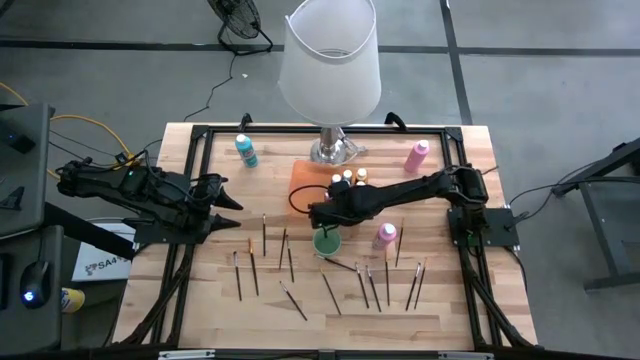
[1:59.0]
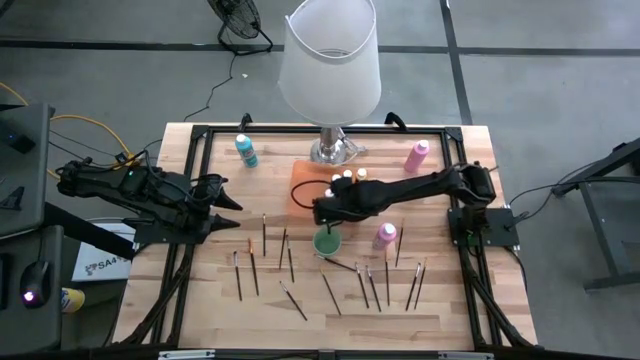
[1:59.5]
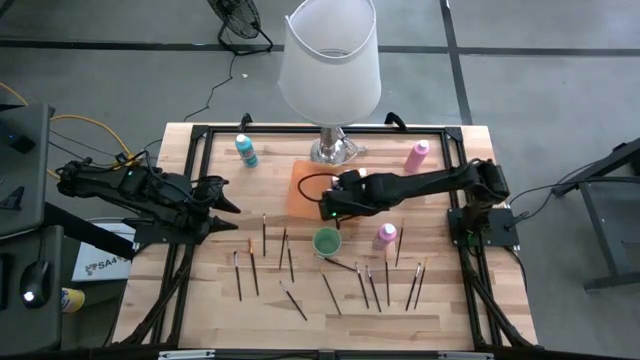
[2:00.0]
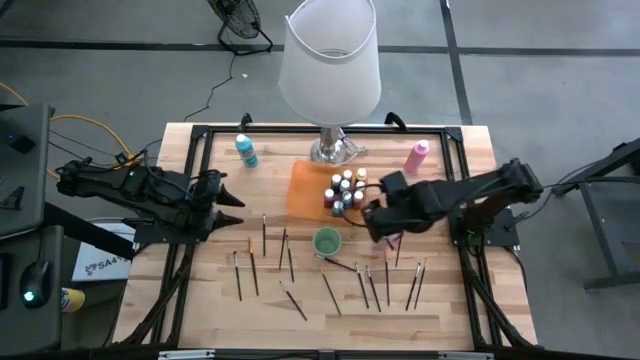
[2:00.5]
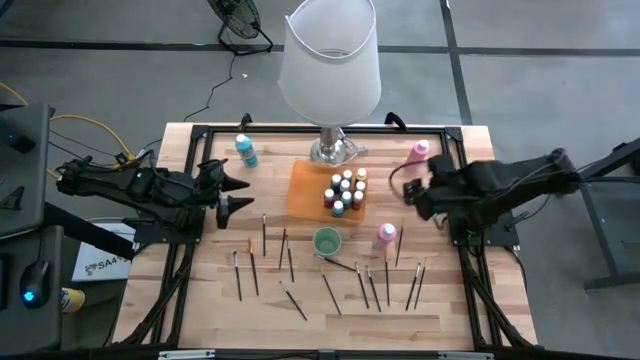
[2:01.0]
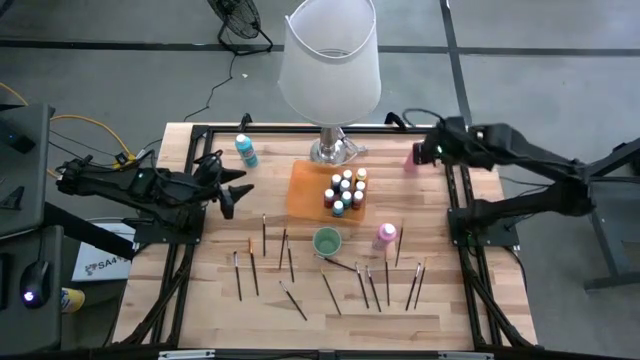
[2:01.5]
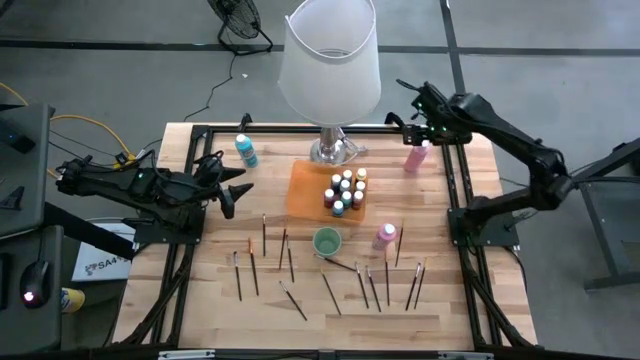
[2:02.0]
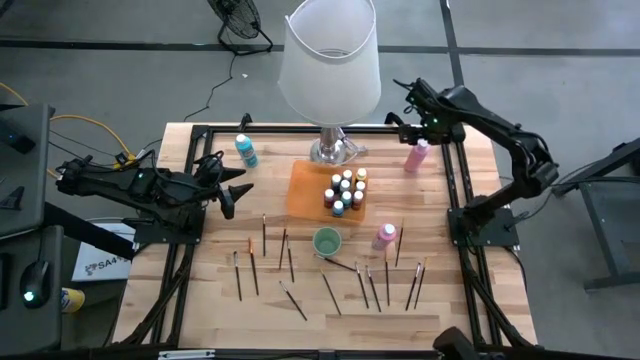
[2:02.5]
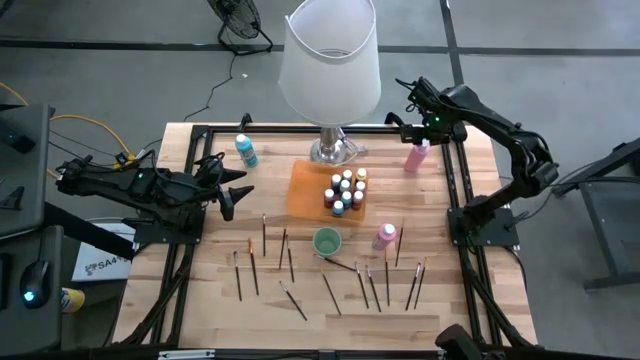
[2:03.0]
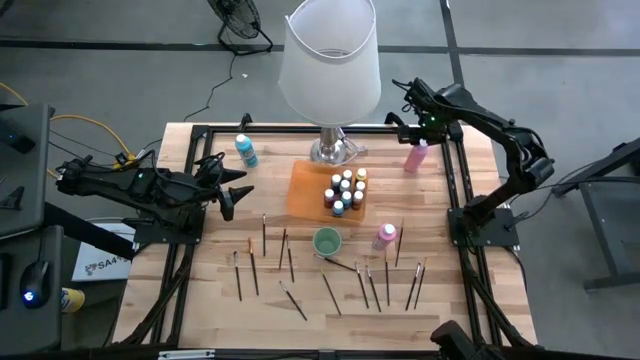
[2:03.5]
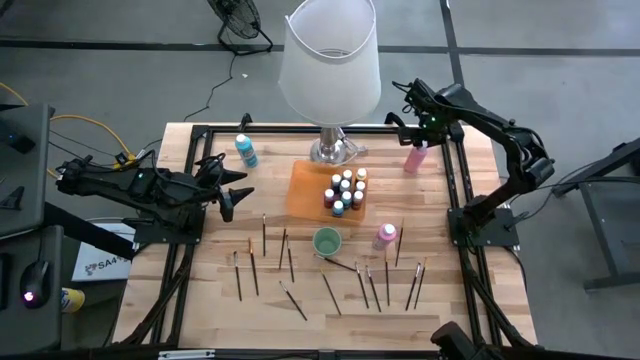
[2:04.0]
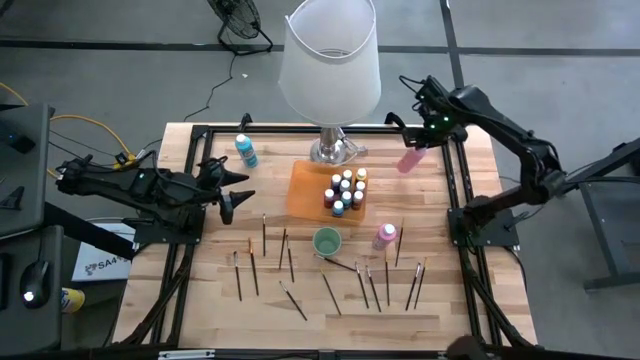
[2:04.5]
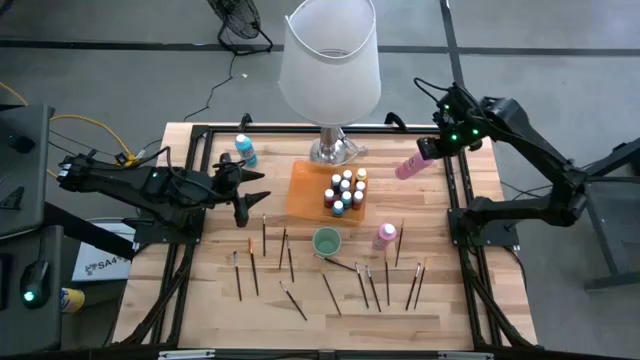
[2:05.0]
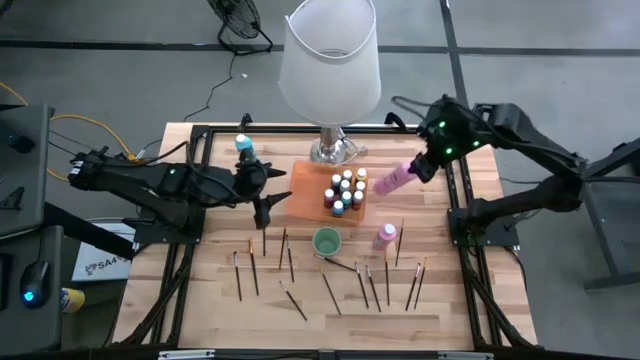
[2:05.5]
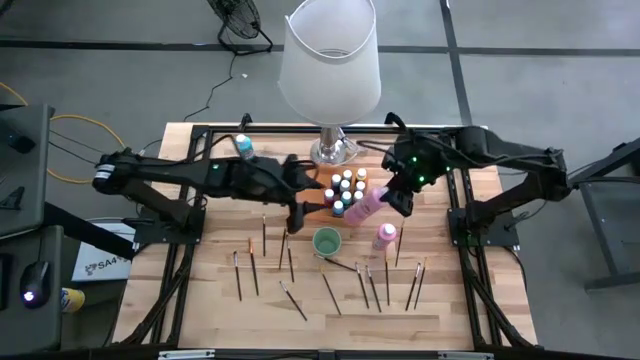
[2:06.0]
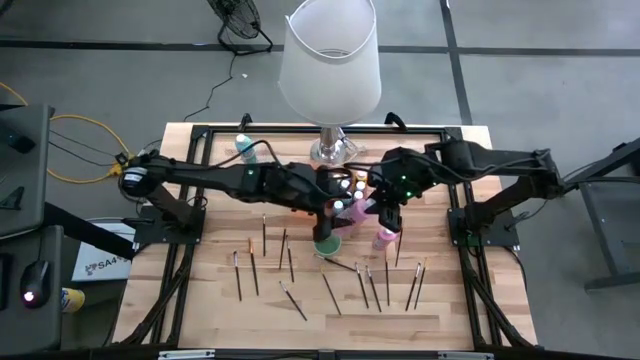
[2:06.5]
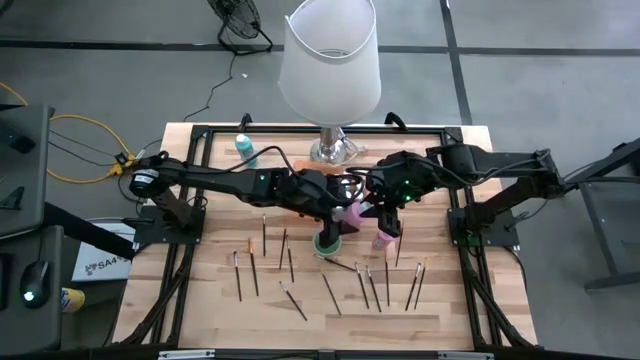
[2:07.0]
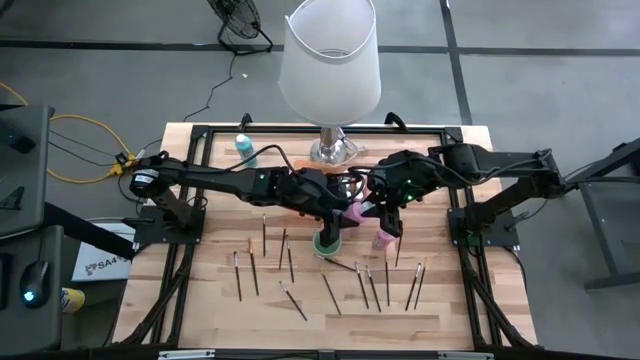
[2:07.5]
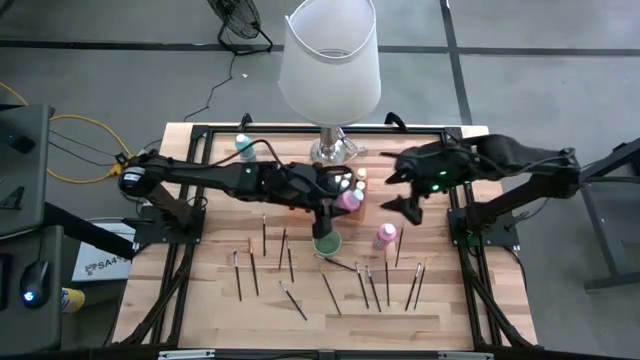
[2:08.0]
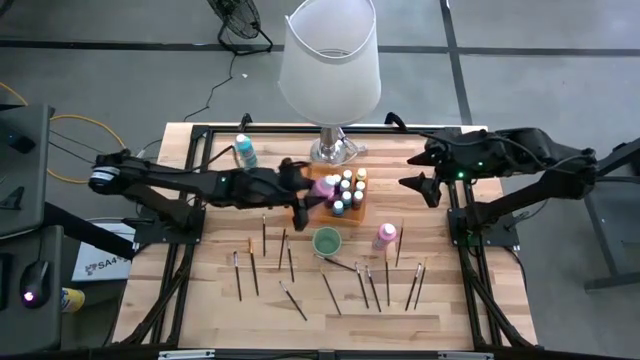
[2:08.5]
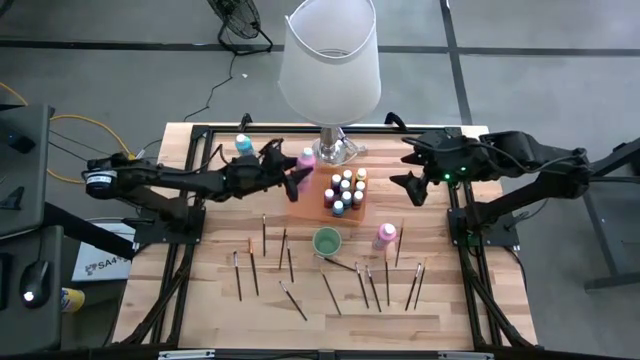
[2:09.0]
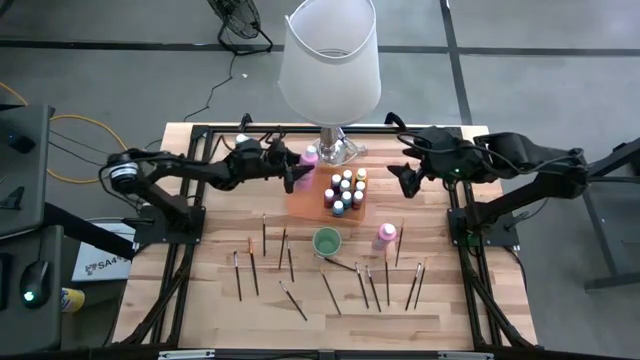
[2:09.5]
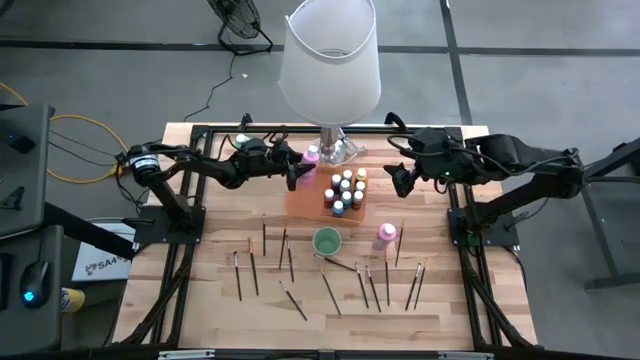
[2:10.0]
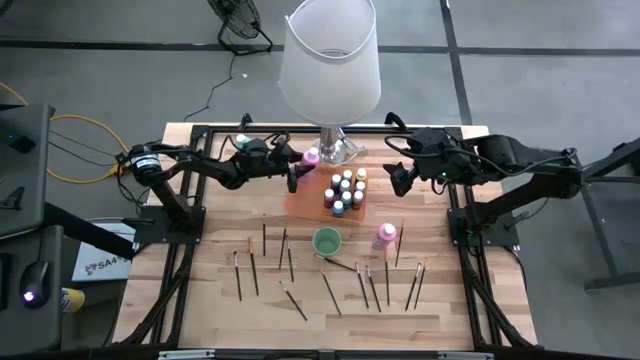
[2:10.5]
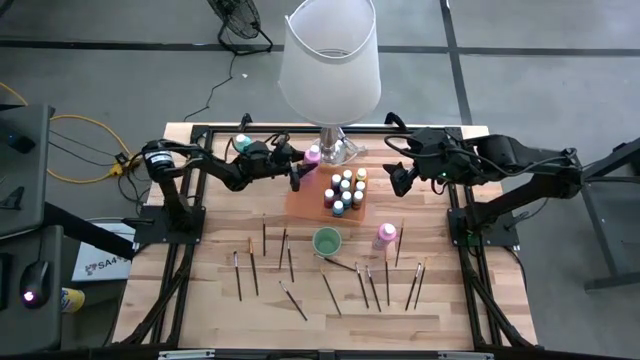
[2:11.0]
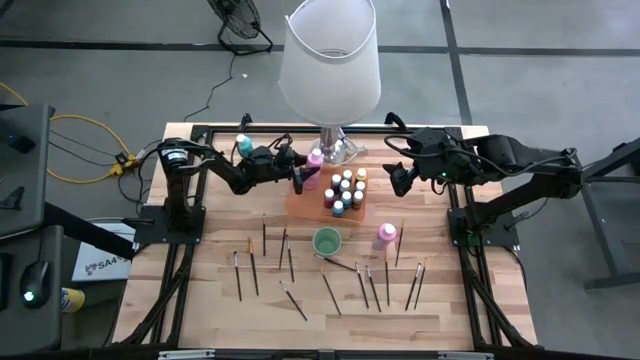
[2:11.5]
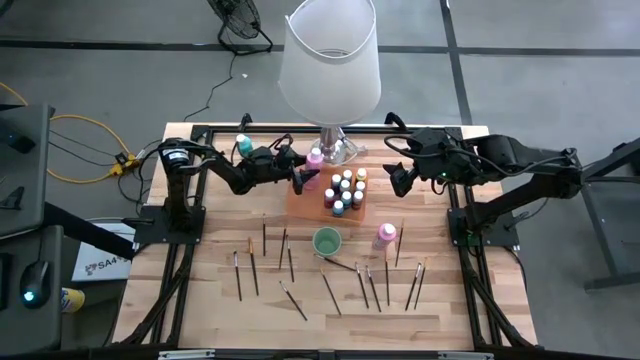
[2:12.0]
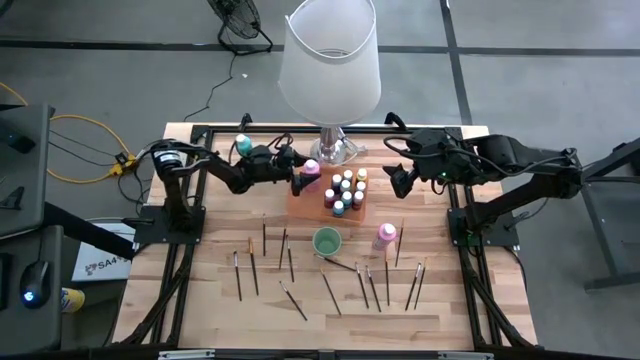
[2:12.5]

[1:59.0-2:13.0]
Task: Pick & Place Paint Supplies
Put the big pink paint bottle into the orange bin

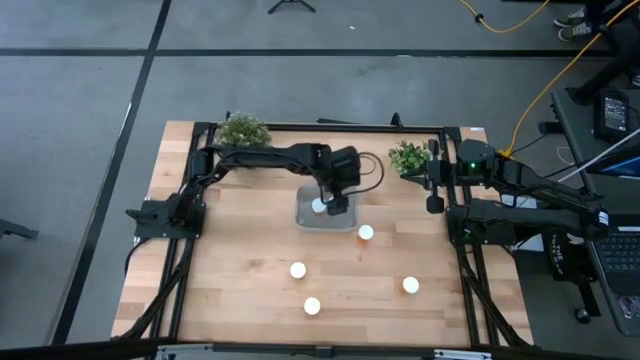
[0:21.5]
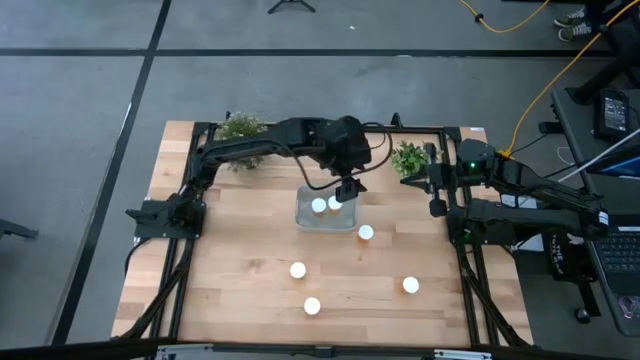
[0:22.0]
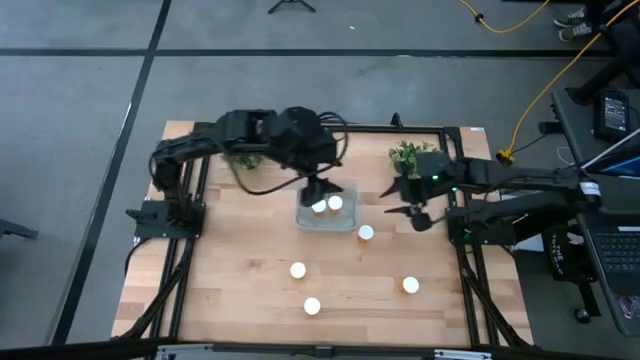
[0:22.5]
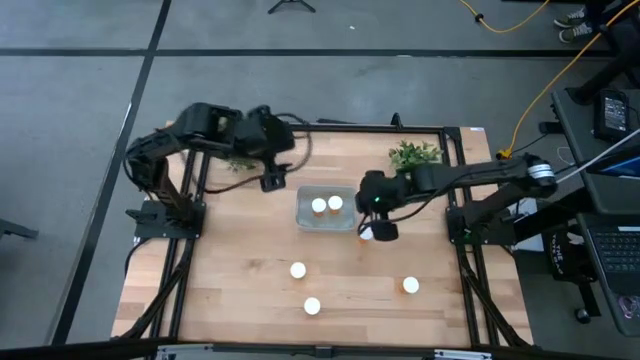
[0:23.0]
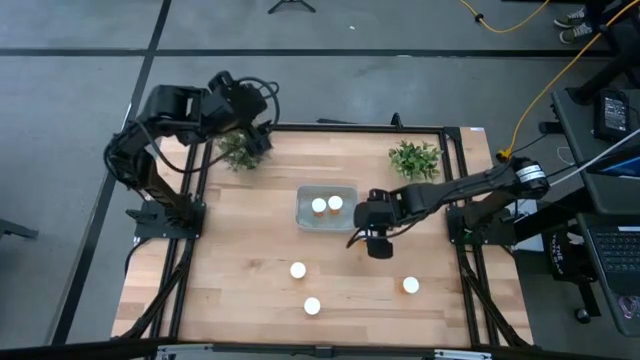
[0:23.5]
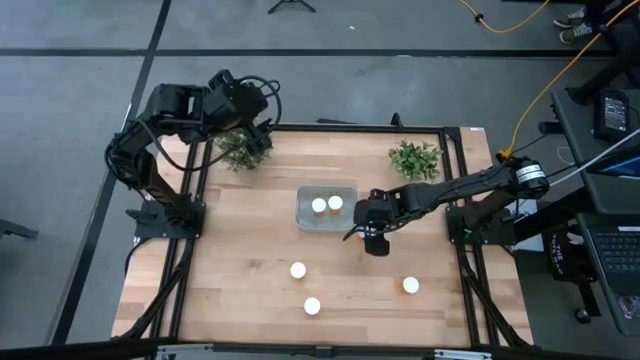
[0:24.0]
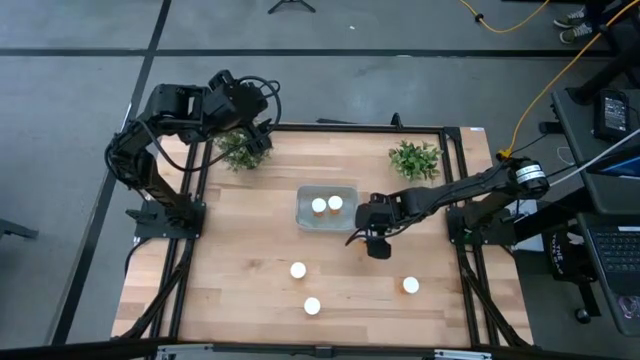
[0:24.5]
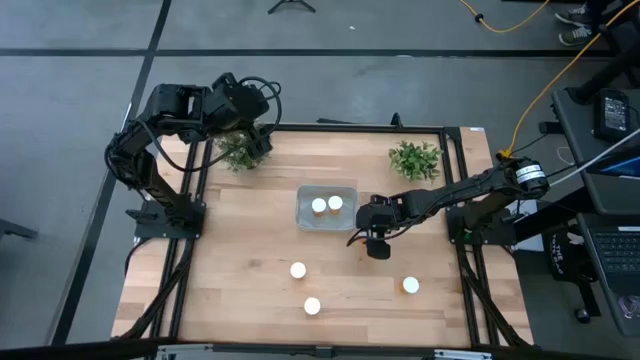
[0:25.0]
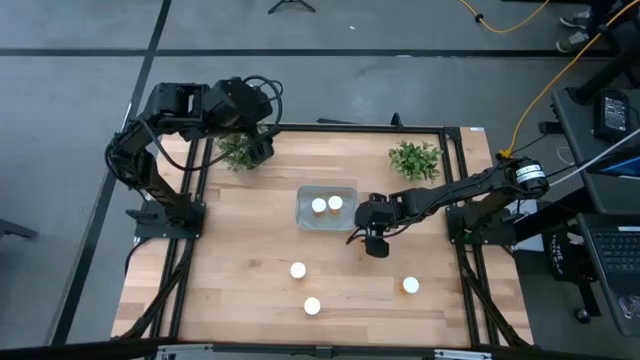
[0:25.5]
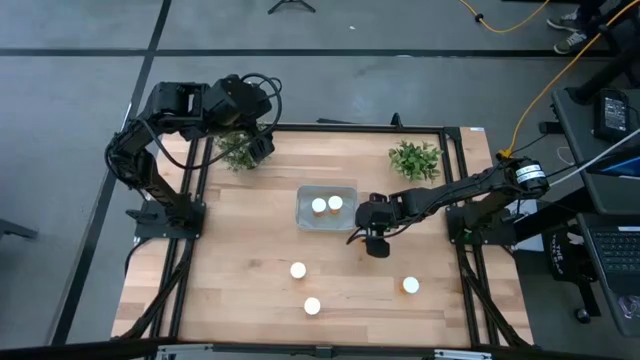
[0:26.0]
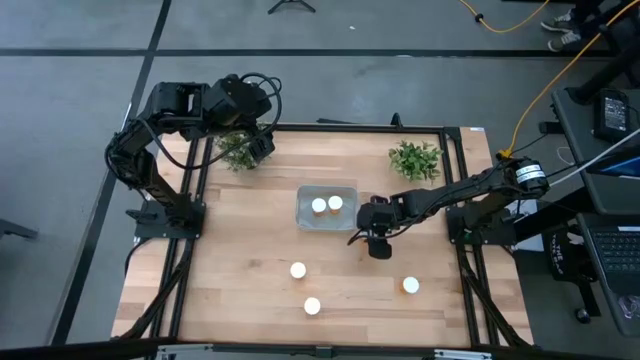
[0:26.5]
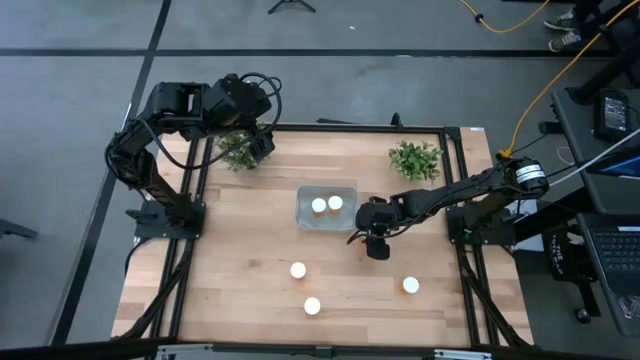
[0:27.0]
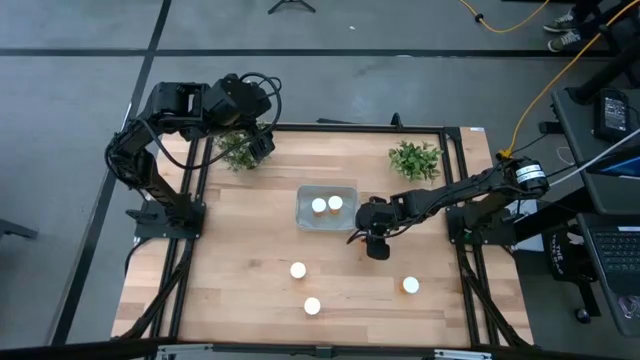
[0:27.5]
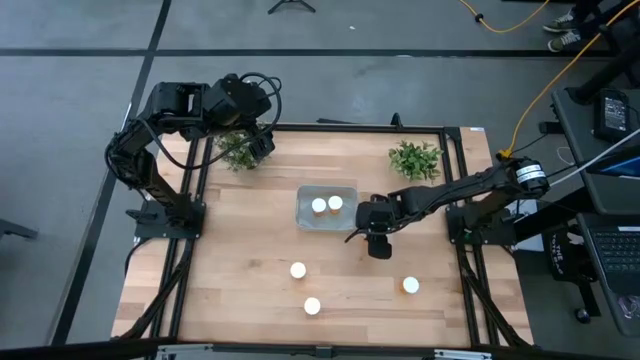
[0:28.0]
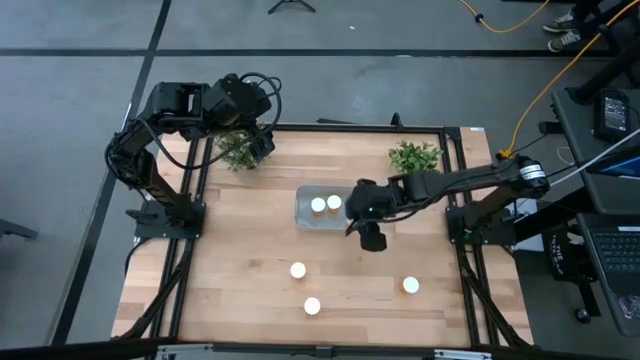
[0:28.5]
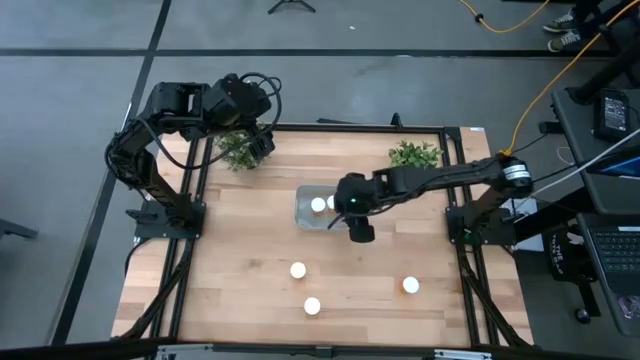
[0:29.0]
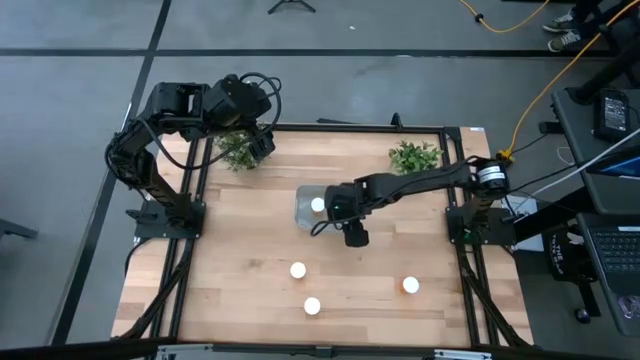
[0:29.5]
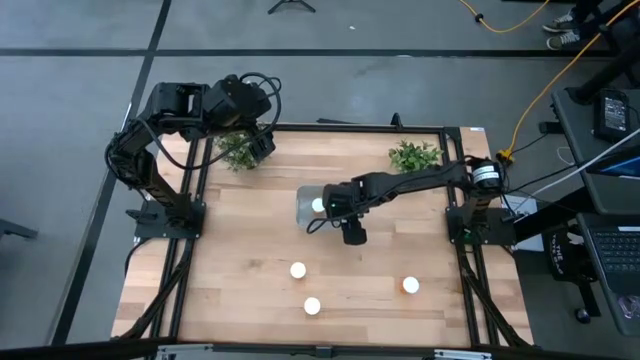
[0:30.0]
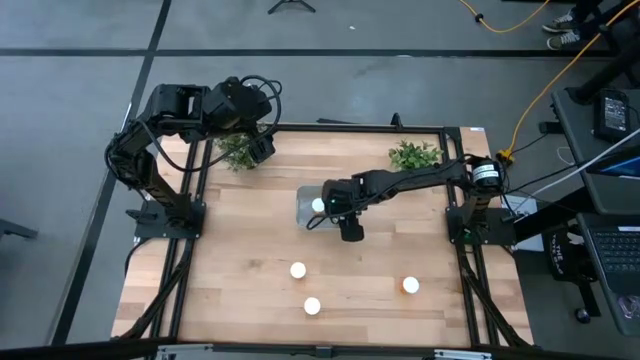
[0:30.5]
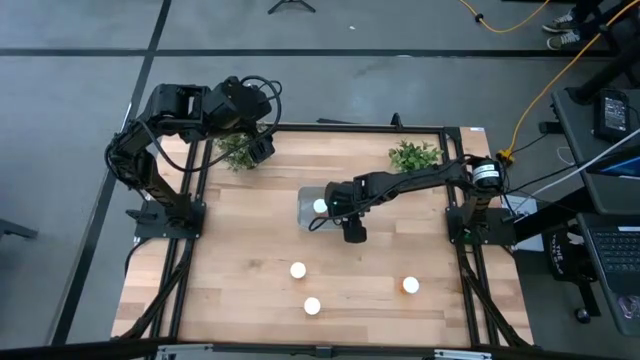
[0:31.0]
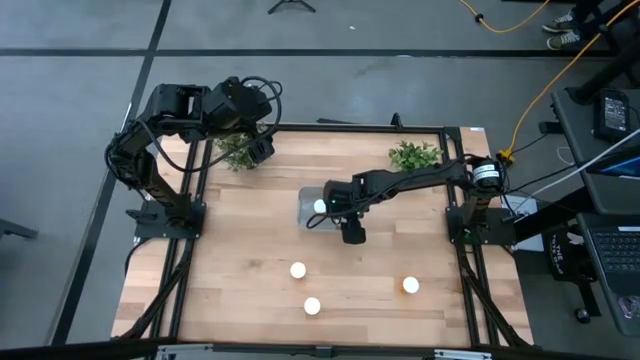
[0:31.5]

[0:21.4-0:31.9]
Task: Pick and place pill bottles into a basket
Put the orange pill bottle into the gray bin
